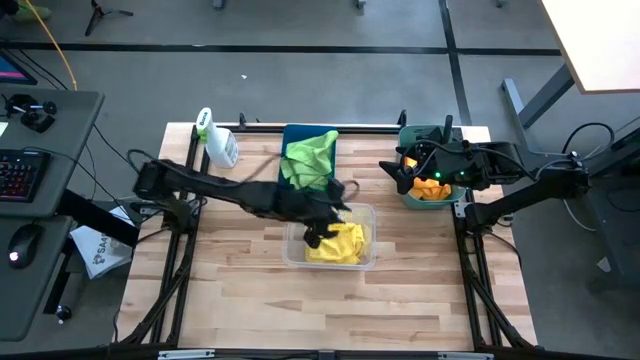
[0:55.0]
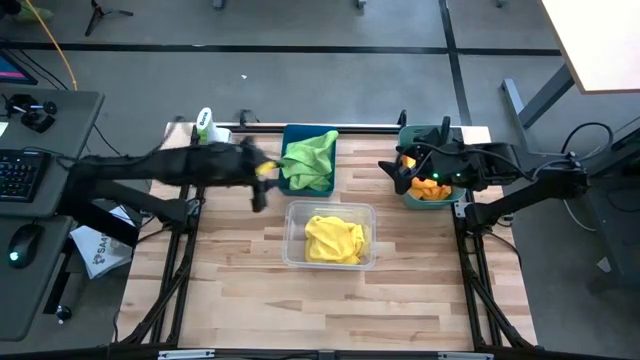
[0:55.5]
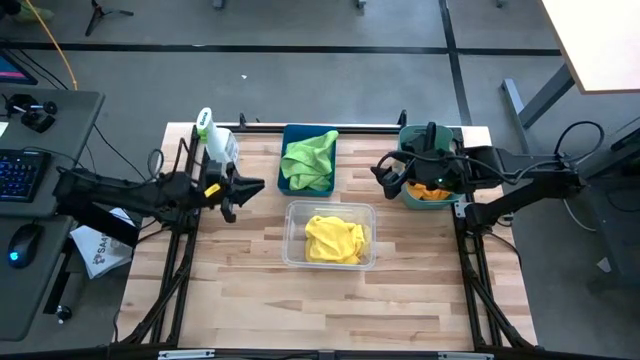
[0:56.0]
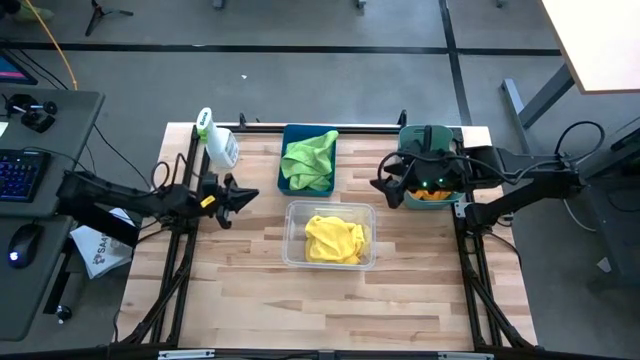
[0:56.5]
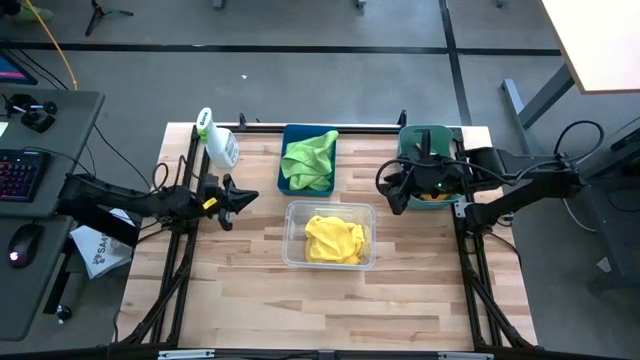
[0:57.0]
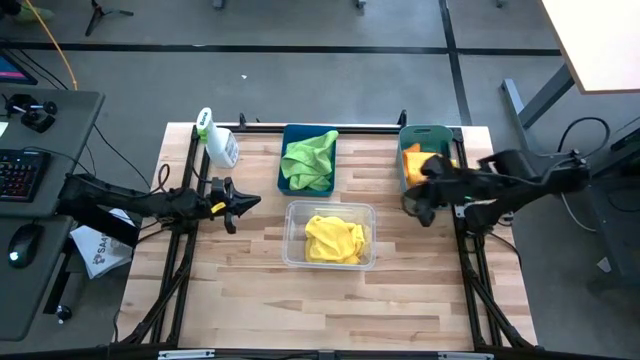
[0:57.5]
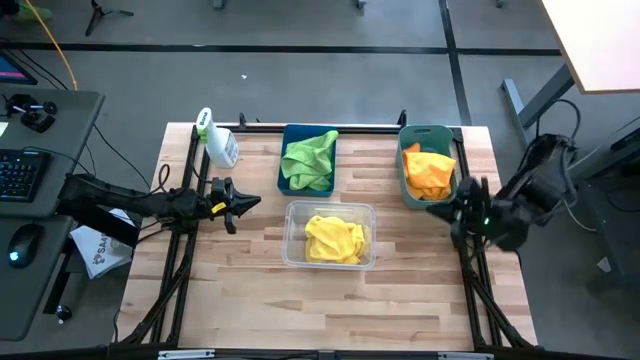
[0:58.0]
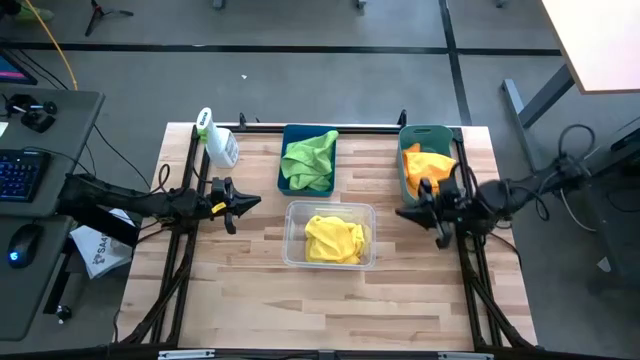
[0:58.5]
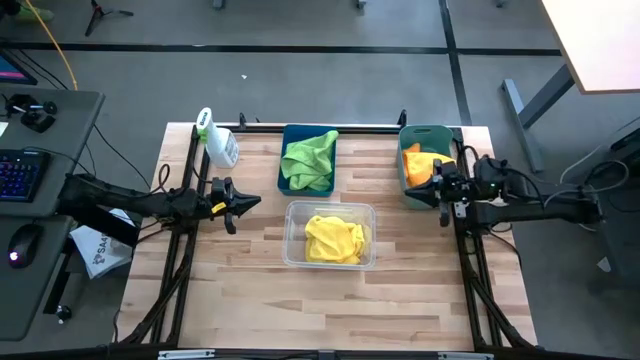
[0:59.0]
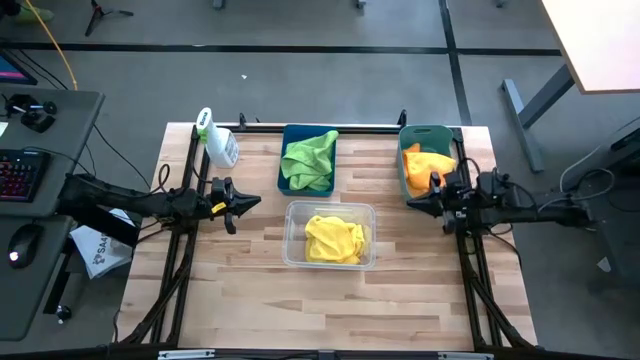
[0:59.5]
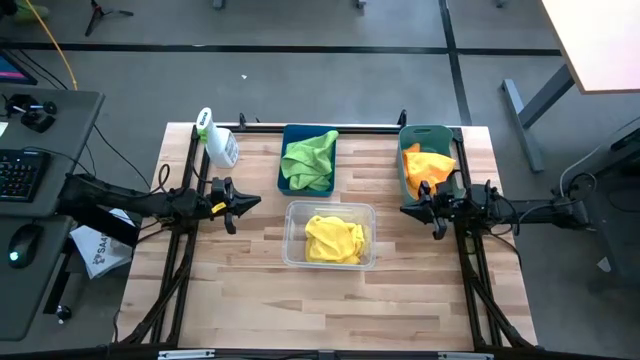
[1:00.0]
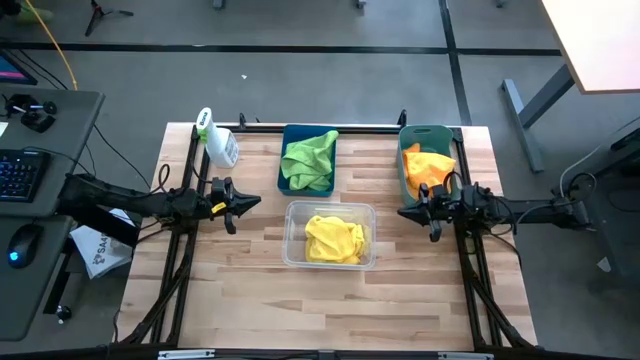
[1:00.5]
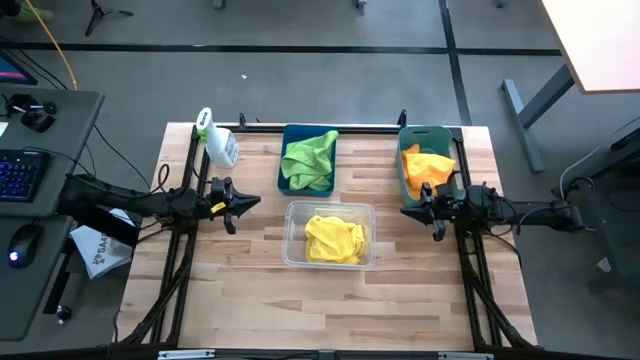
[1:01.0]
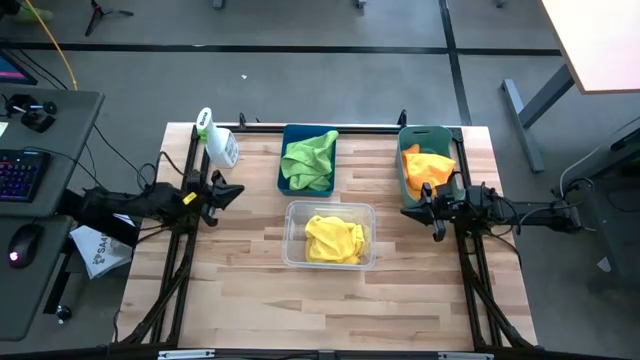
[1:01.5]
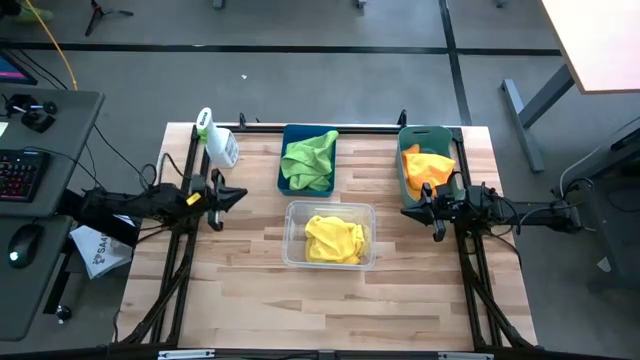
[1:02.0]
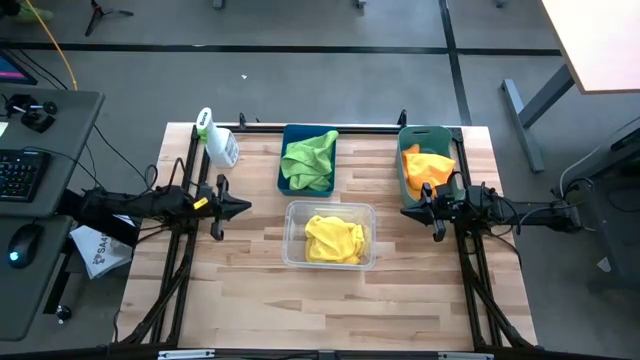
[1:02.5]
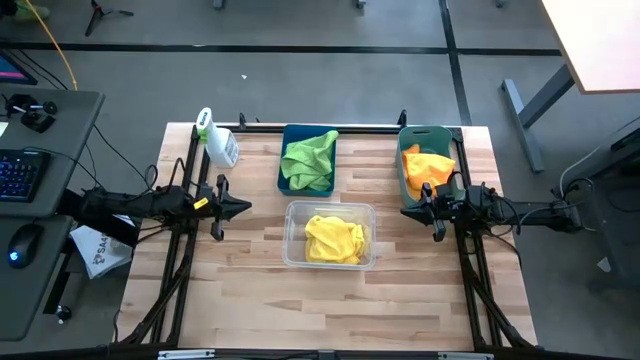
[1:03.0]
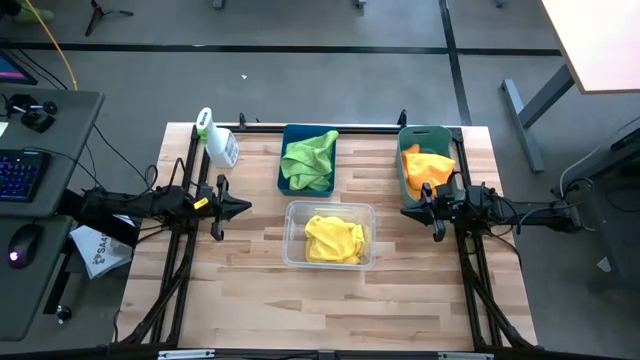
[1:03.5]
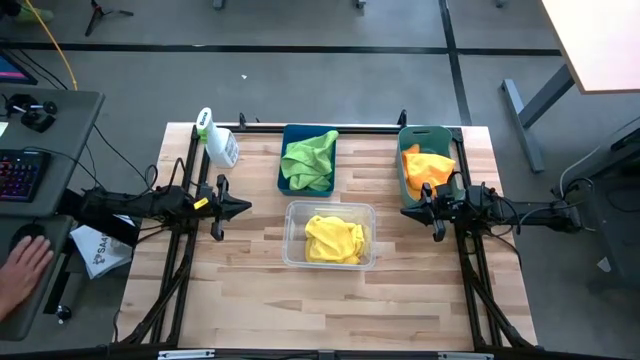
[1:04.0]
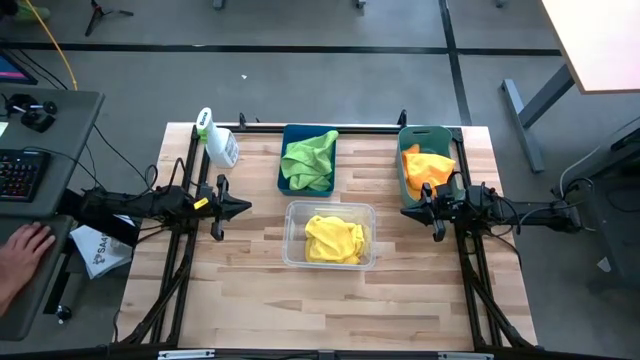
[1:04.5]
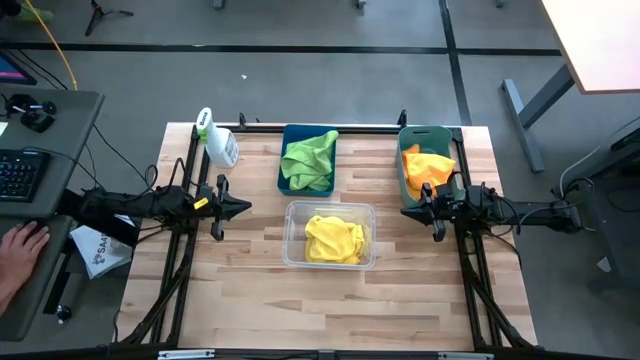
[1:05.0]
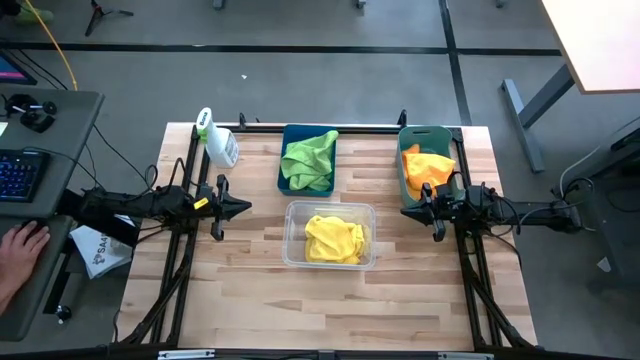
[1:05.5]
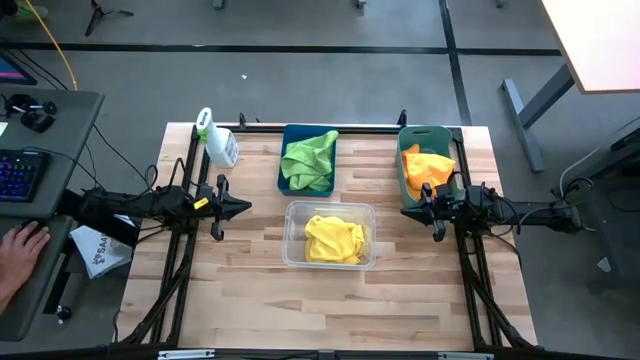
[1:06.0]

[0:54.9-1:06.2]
Task: Sort microfiber towel by color & place in baskets
Return to Home Position

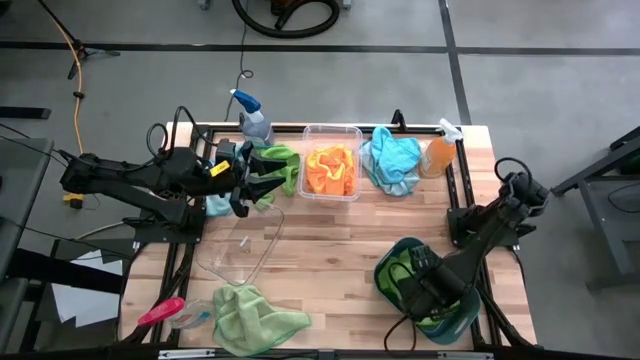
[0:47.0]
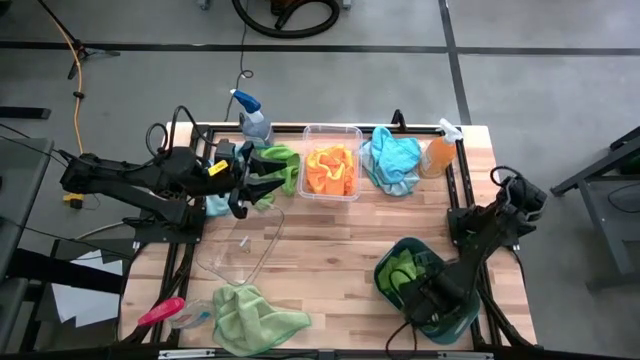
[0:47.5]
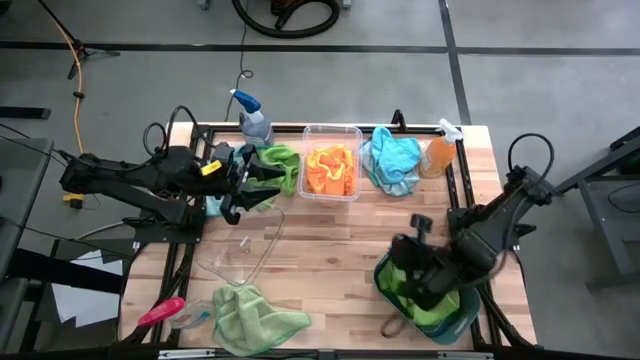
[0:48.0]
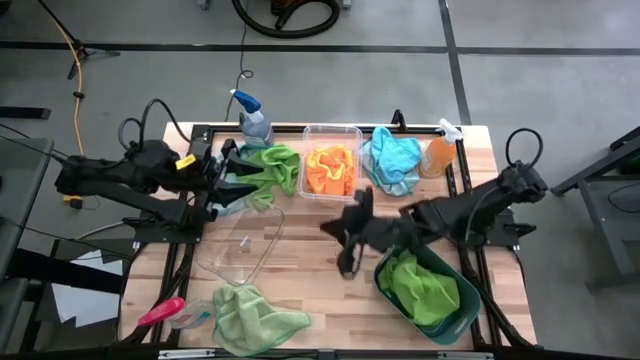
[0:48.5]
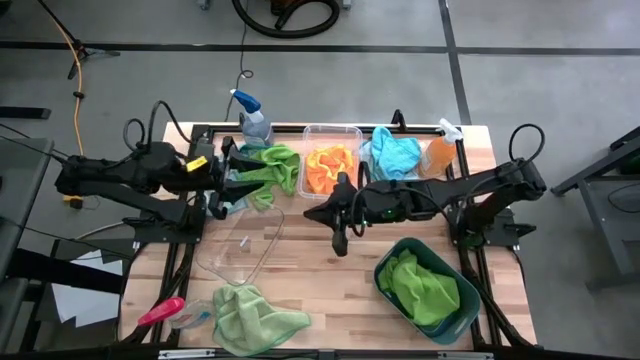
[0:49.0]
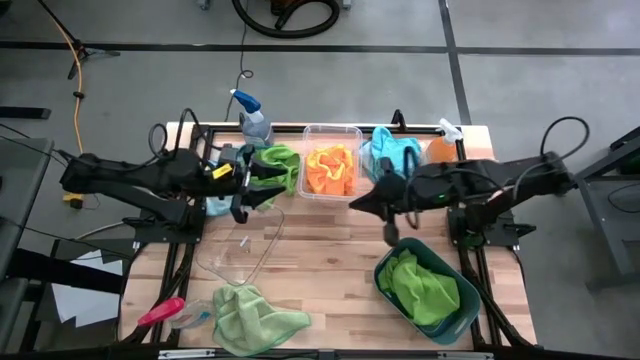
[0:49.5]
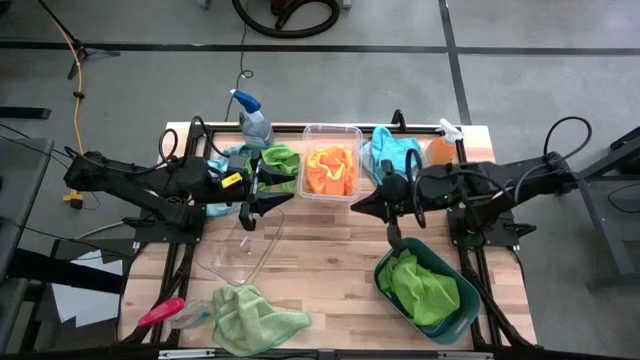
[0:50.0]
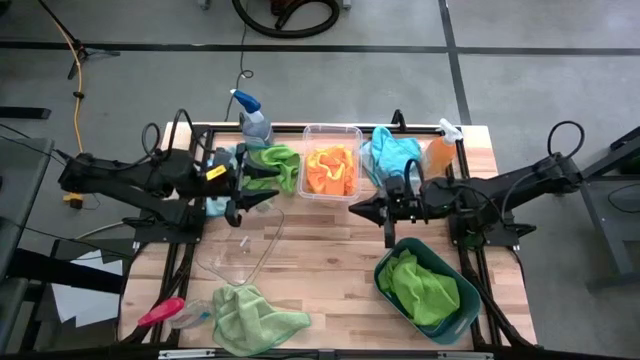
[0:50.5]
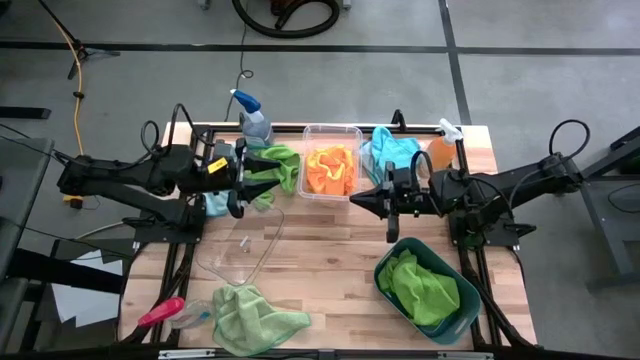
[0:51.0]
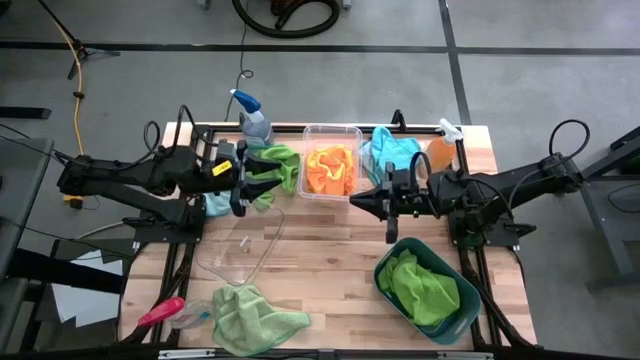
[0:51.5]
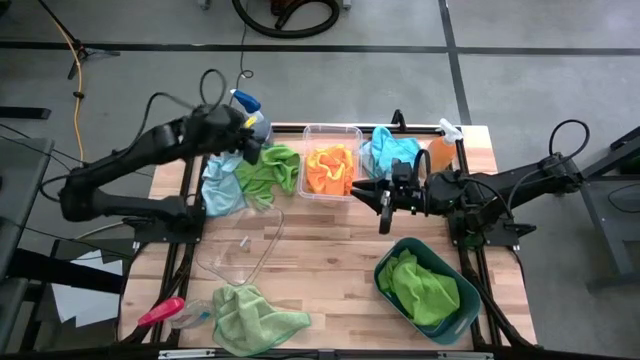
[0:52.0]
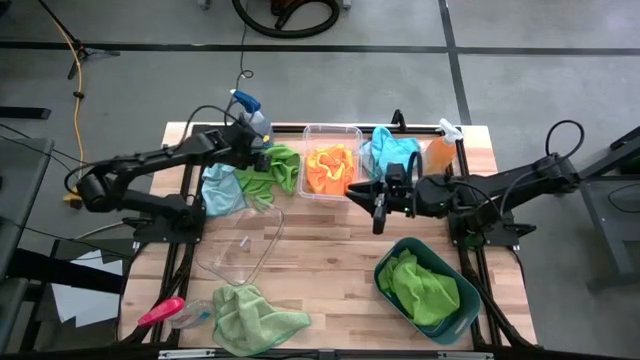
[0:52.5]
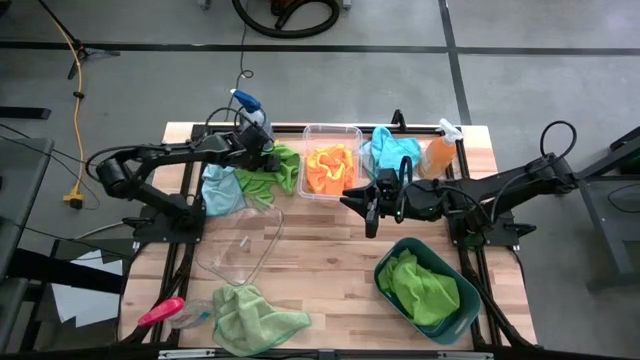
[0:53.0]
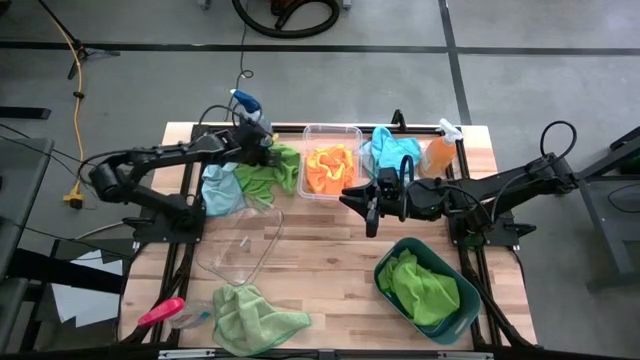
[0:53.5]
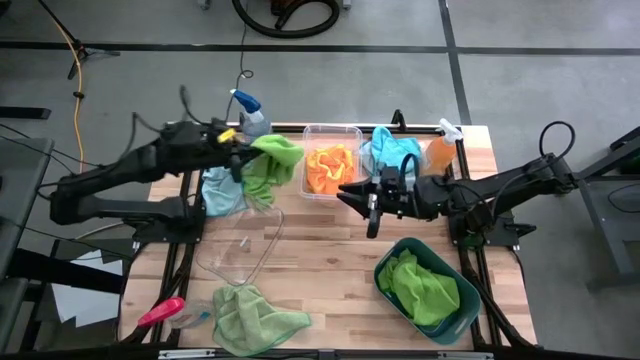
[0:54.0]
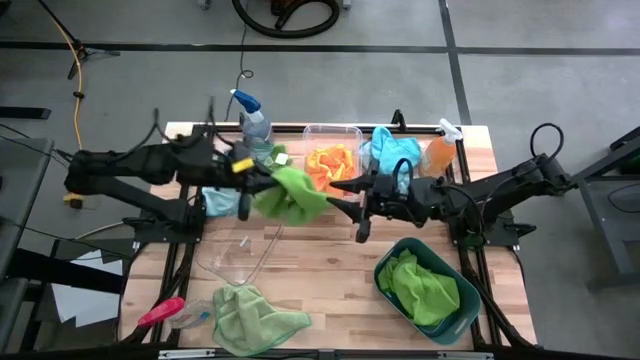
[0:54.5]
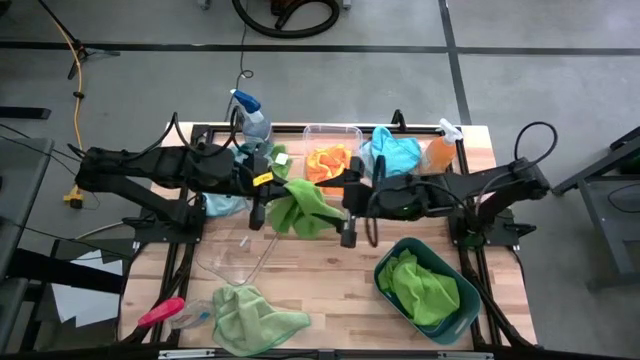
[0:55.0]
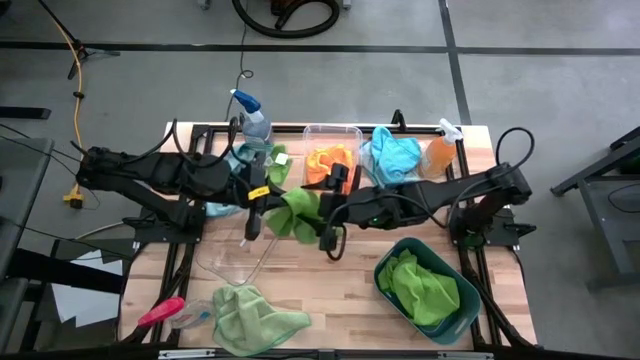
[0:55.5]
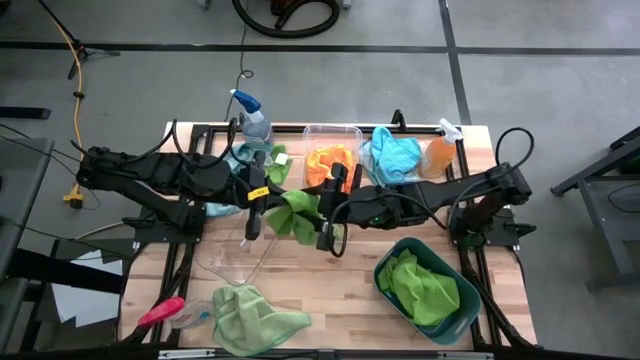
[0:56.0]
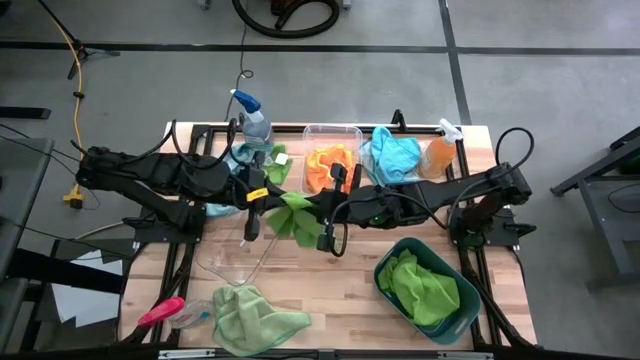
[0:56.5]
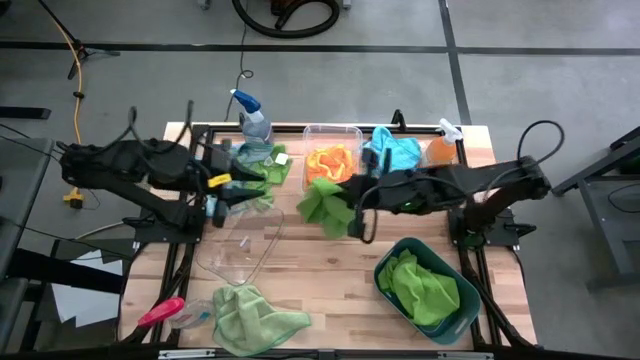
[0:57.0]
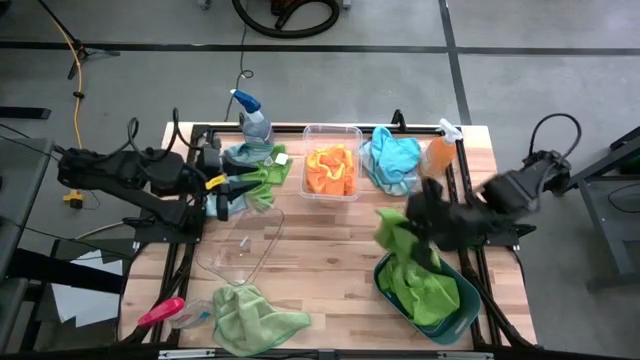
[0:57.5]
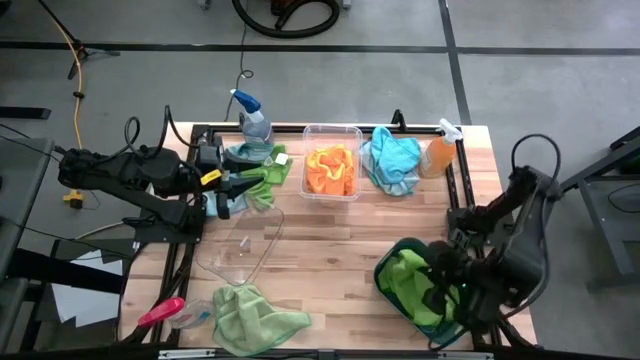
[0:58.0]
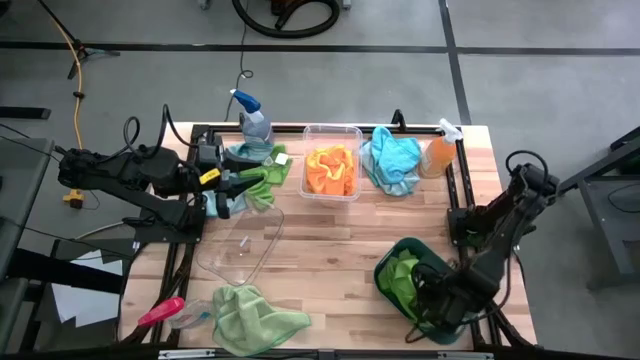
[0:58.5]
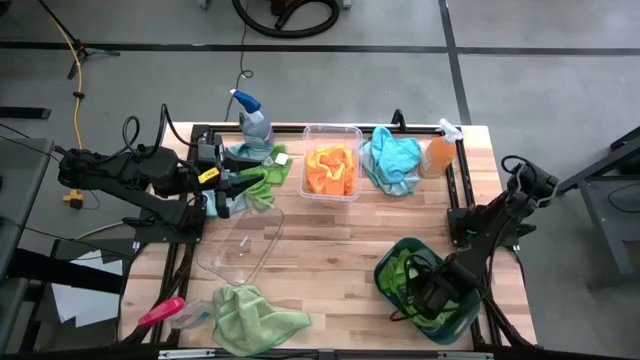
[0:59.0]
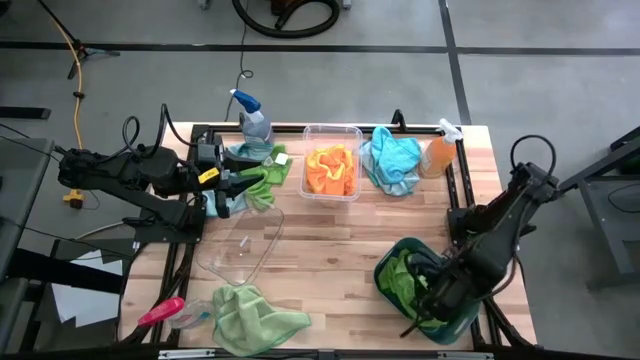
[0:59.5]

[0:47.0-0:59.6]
Task: Sort microfiber towel by color & place in baskets
Put the green microfiber towel into the blue bin
